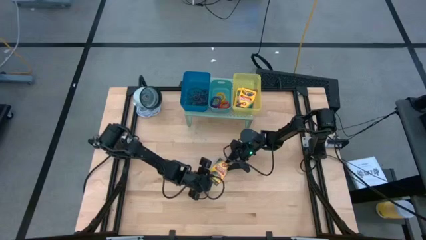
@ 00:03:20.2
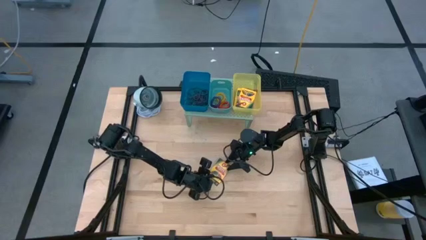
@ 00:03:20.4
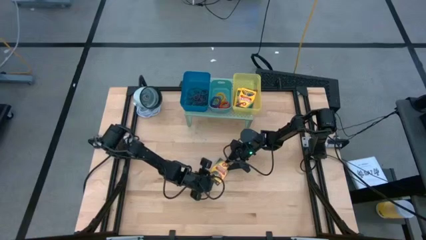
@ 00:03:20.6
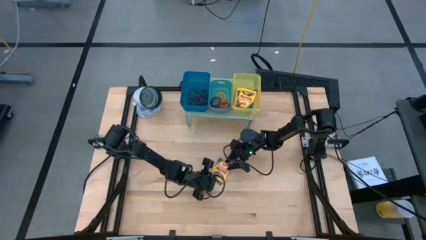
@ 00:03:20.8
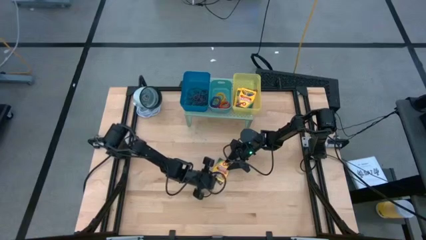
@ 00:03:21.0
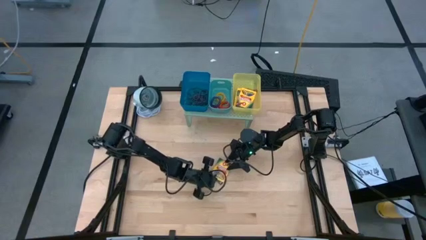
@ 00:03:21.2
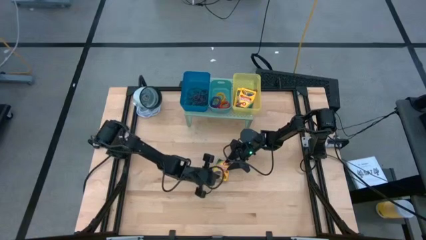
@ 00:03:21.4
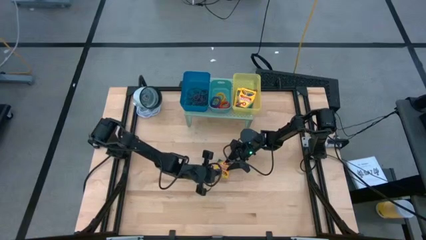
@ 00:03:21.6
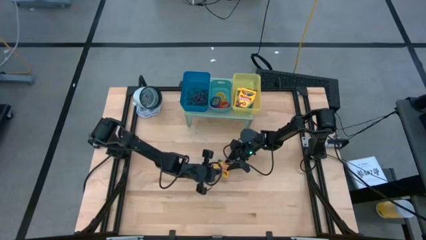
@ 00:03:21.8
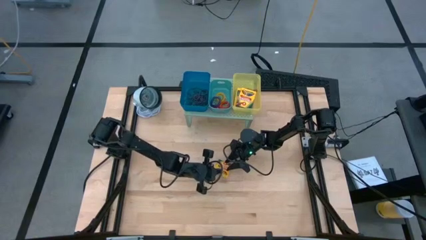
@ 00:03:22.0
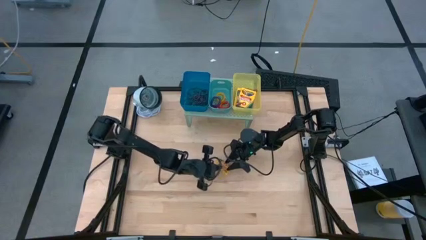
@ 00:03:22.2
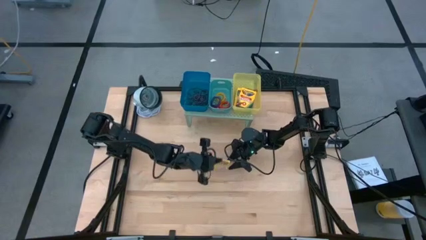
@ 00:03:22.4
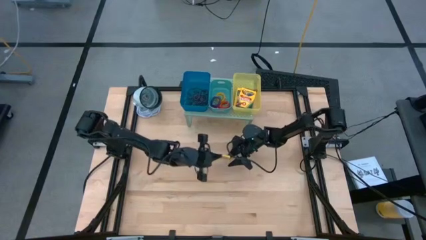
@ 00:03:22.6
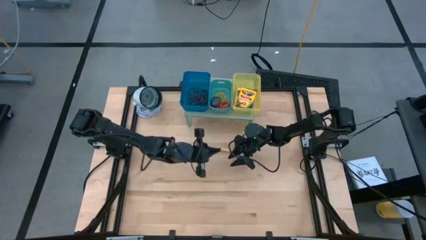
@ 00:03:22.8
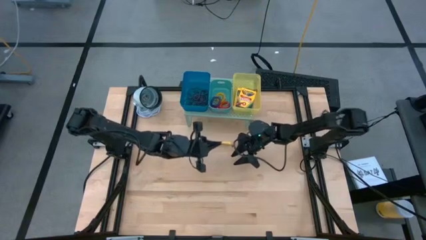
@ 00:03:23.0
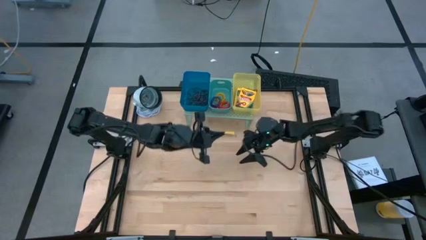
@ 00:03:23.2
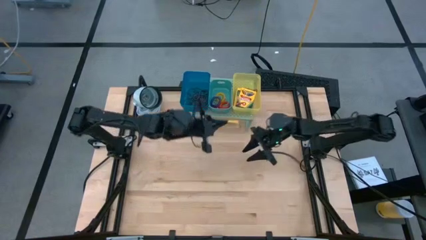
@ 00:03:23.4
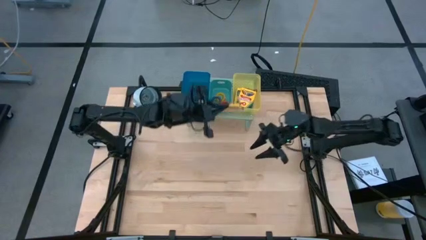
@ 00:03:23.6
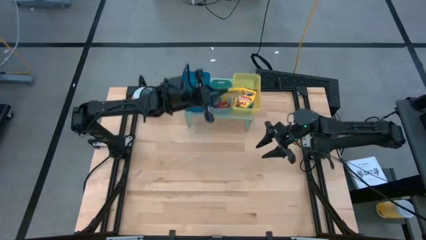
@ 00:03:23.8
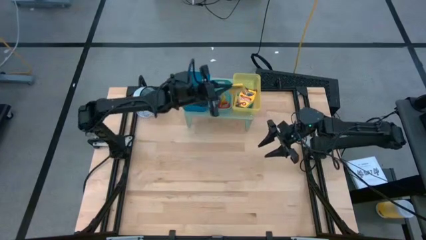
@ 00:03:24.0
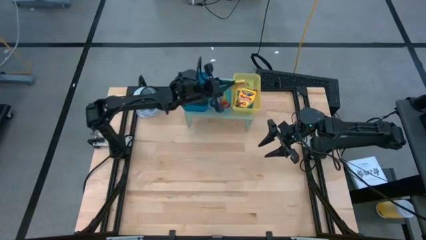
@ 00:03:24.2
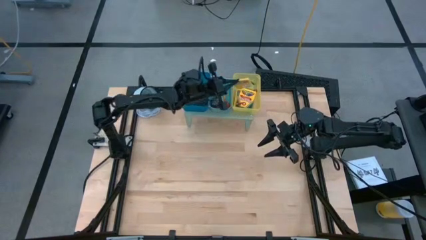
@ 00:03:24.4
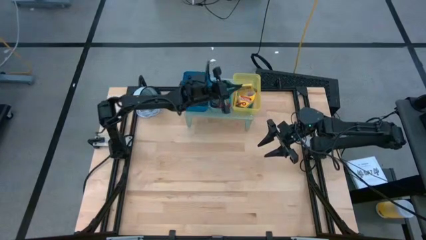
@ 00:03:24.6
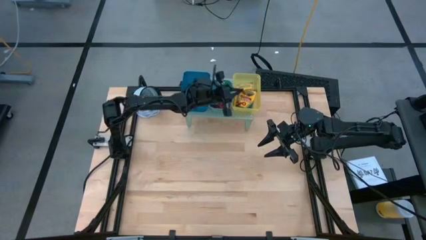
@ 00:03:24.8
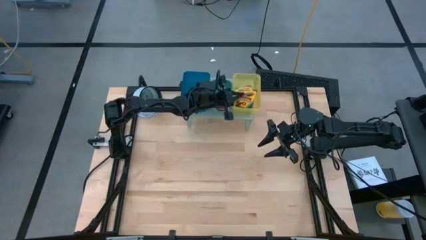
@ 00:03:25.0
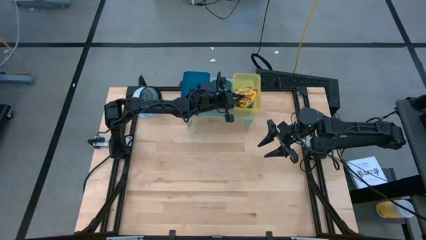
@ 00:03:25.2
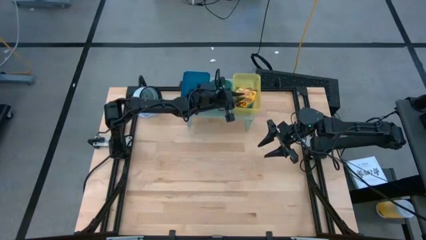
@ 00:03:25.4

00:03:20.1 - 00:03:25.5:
Task: Pick & Place Office Desk Supplies
Put the yellow crayon box into the yellow bin on the shelf

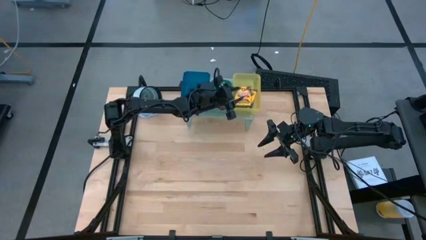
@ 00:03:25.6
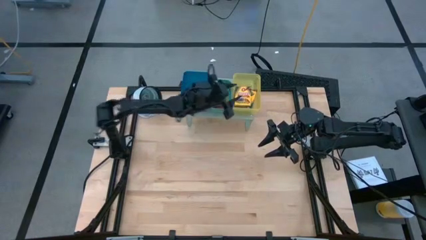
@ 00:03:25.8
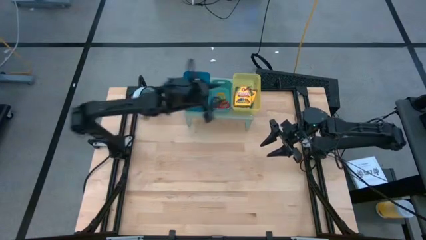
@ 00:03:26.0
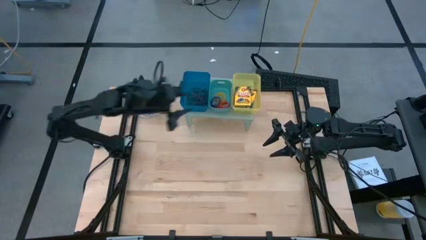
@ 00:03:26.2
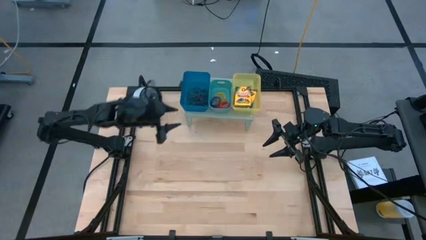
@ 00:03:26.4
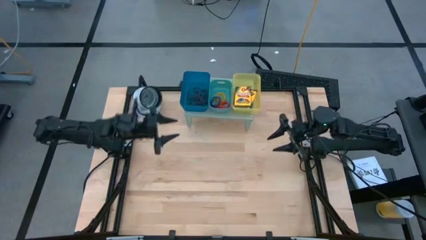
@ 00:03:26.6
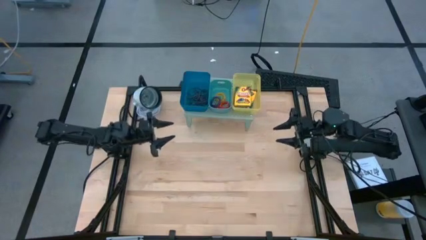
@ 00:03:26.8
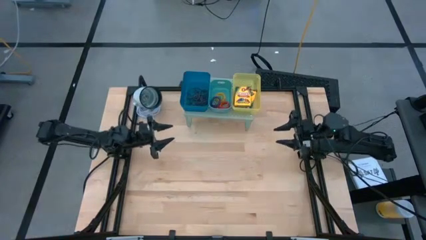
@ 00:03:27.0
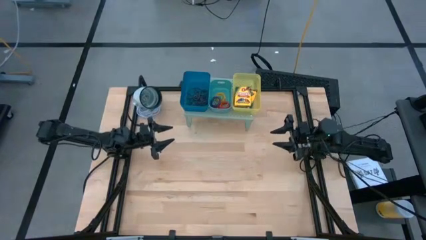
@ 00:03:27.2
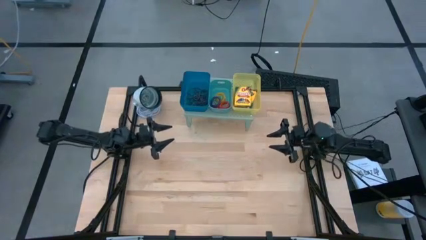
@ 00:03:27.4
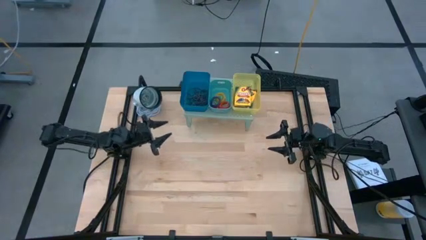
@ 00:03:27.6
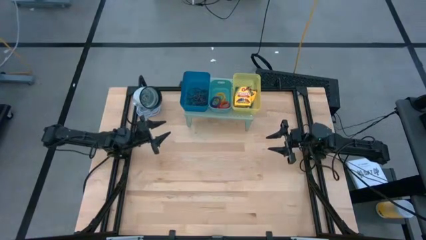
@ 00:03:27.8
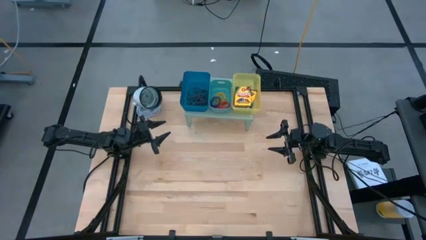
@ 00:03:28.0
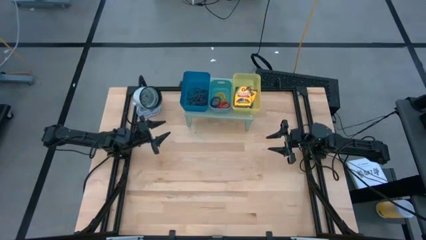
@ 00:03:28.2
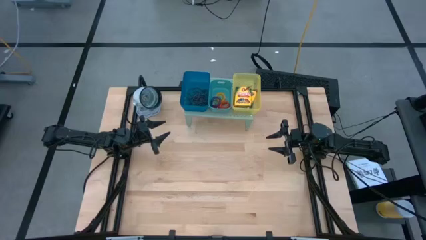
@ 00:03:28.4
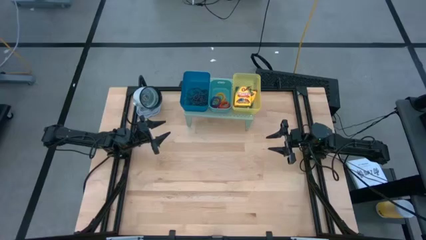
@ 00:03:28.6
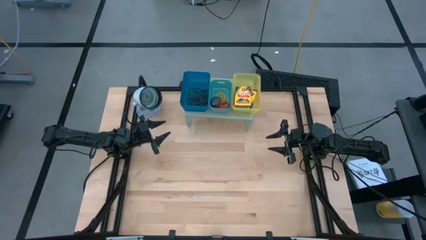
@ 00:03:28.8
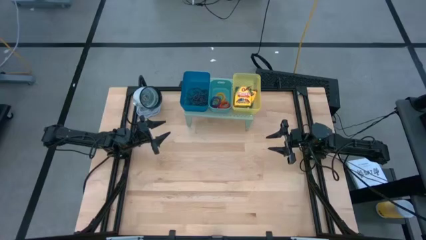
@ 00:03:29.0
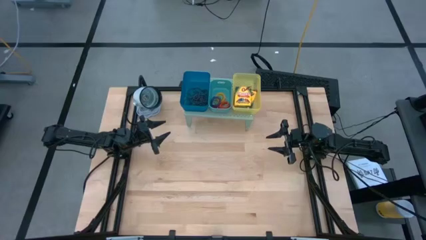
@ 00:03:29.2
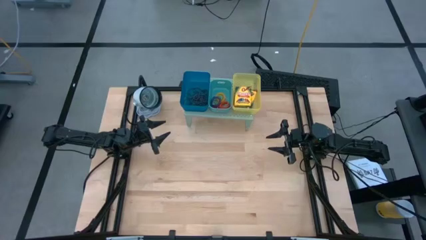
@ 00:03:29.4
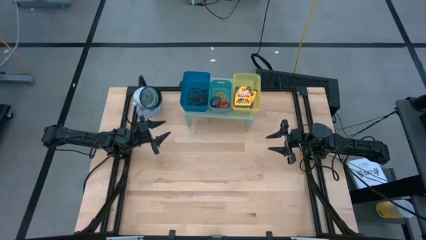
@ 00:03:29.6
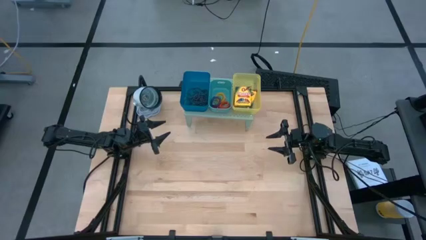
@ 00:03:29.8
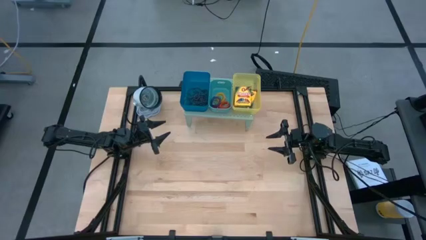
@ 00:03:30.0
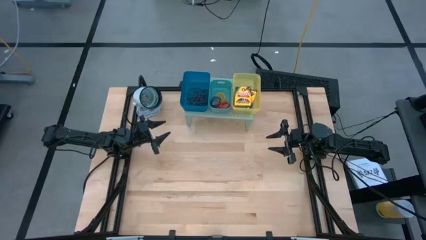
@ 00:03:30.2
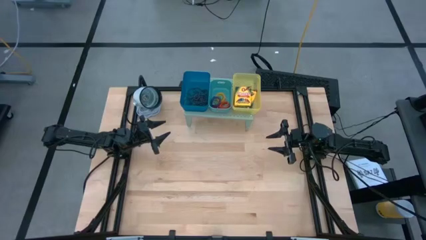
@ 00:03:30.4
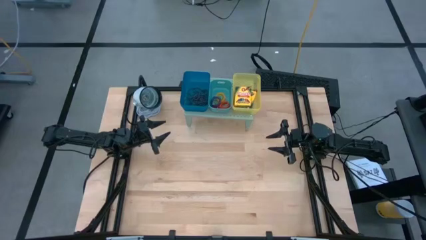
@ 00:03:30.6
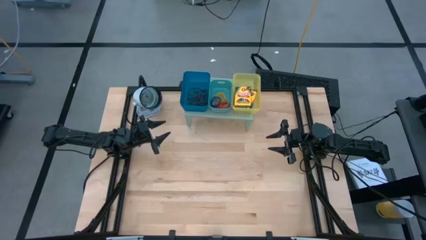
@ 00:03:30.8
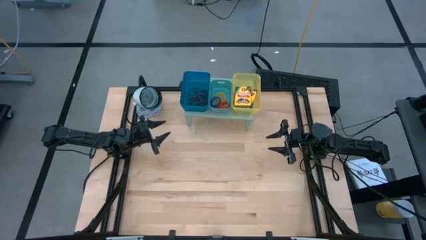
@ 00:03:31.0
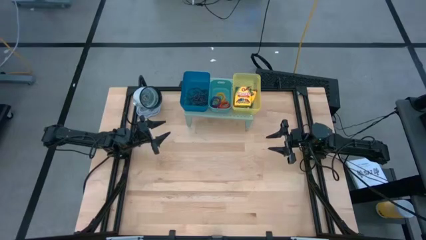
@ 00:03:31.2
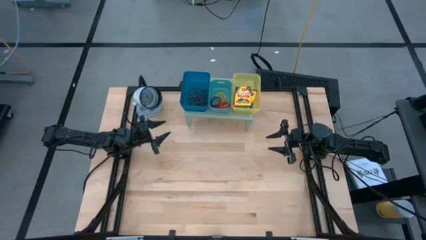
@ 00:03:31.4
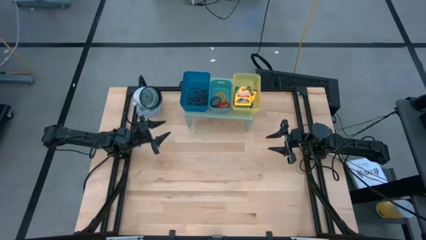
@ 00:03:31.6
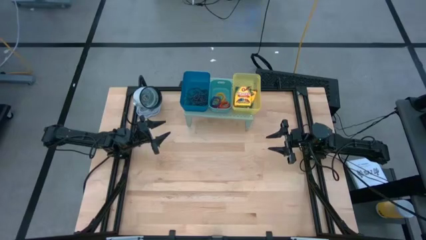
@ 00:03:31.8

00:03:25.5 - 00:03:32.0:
Return to Home Position

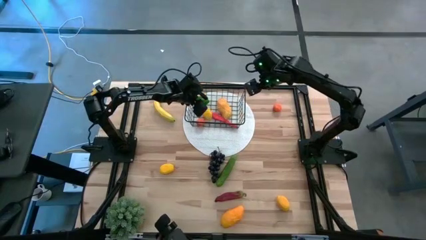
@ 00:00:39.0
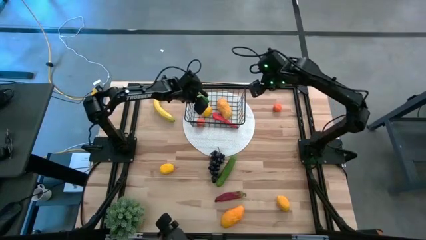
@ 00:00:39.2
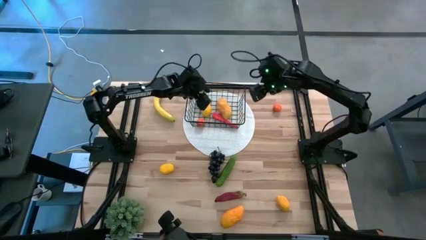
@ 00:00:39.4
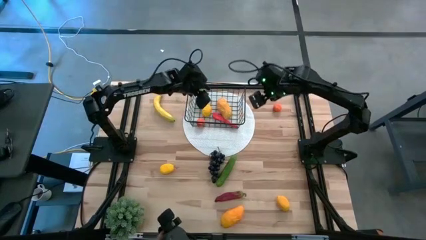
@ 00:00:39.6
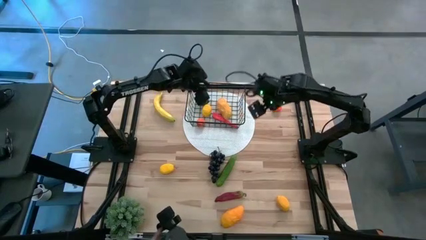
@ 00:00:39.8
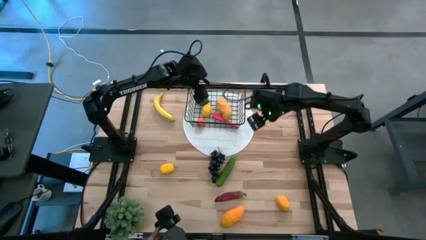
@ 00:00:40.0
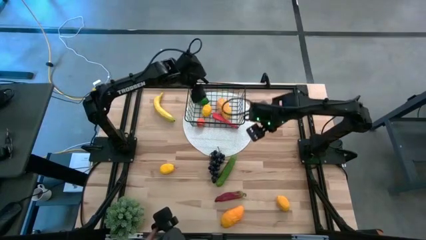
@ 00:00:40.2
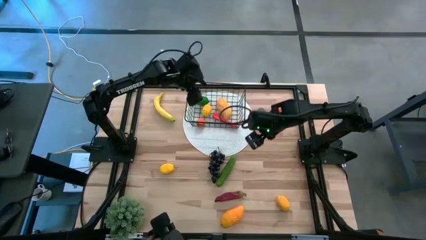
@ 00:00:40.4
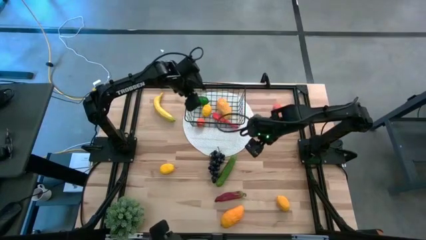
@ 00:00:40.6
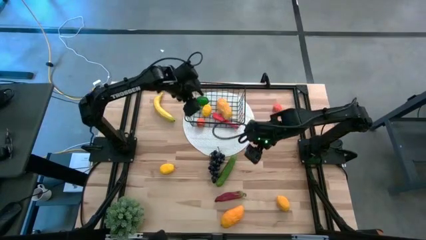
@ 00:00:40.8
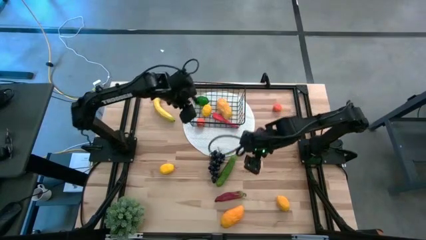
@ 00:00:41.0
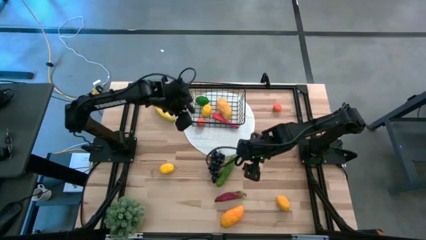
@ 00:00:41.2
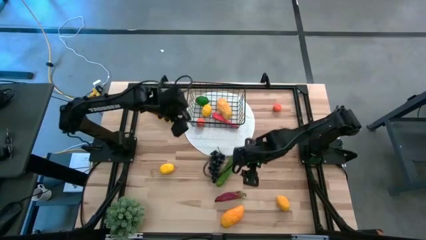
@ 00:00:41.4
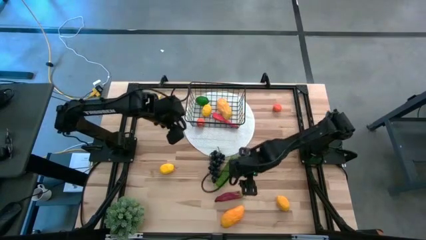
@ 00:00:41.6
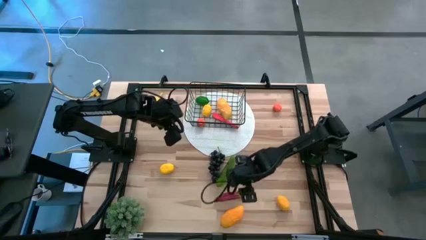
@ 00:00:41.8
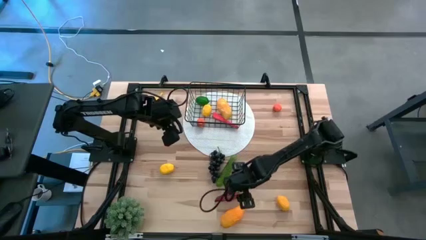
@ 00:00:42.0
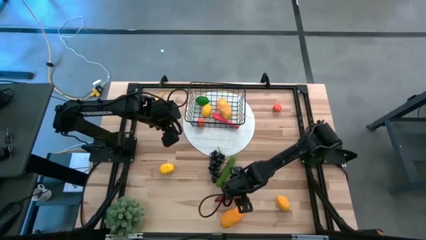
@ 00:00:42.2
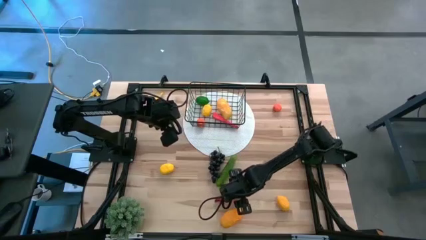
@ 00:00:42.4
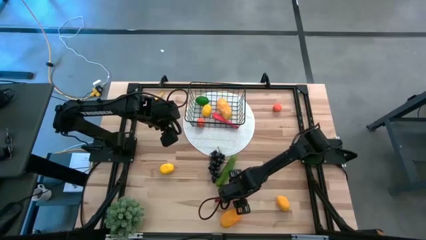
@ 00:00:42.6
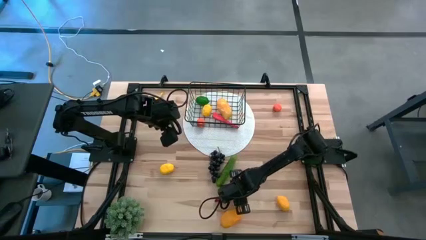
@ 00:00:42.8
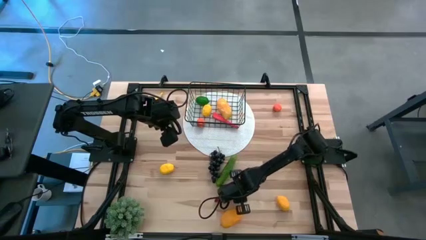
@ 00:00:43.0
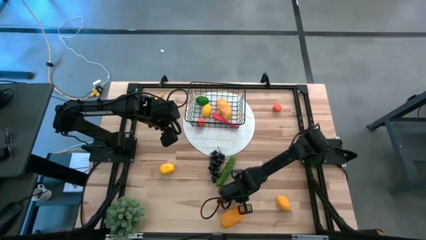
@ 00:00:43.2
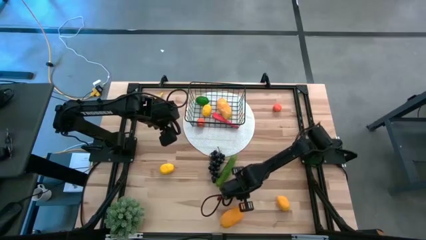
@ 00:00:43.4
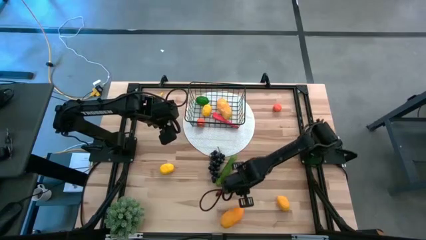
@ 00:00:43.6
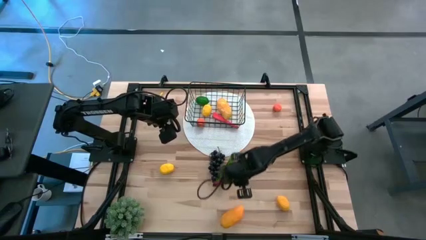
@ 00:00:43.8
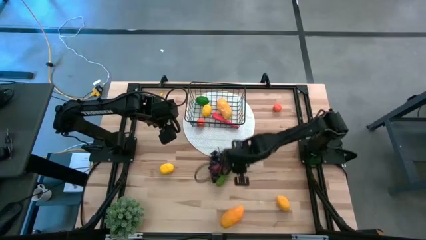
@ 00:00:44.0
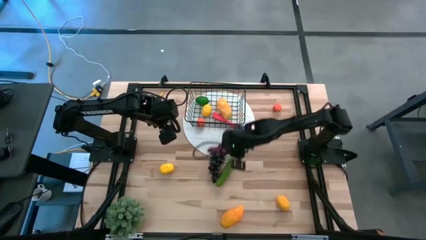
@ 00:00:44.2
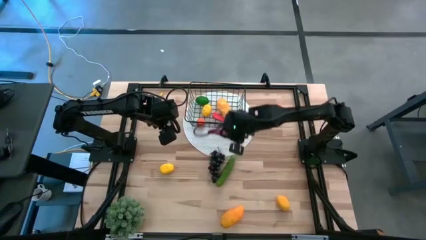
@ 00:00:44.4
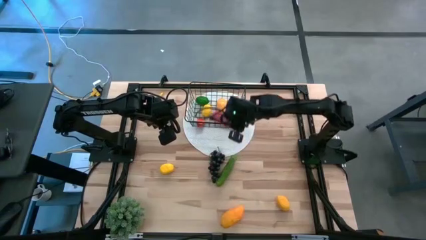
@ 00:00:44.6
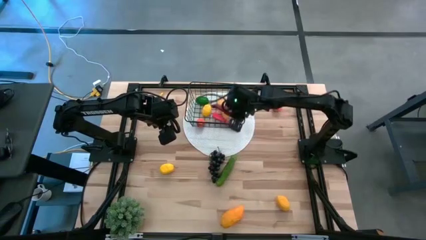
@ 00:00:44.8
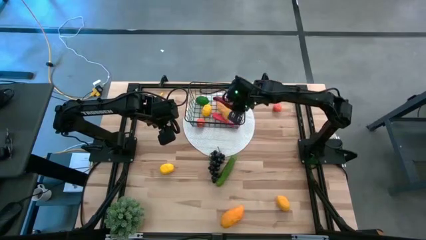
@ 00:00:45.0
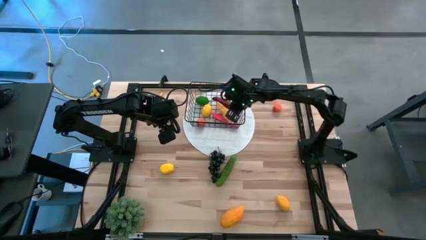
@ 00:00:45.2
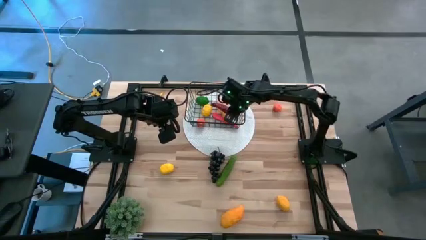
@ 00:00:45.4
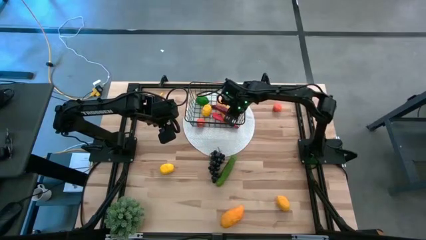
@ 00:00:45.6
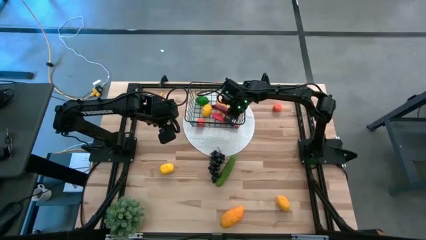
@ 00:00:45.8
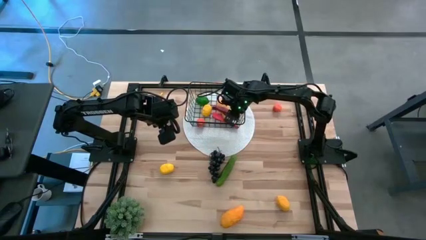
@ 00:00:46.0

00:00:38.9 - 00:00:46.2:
Task: Build produce basket
Put the red chili pepper into the black wire basket
